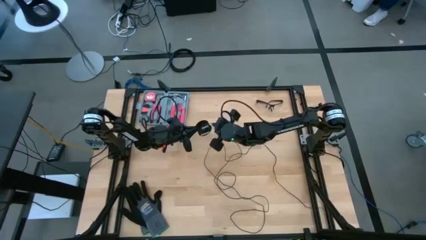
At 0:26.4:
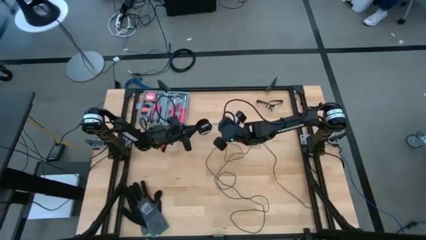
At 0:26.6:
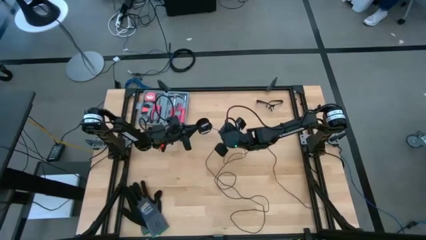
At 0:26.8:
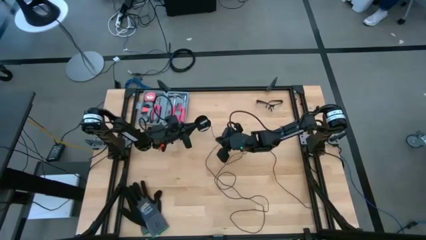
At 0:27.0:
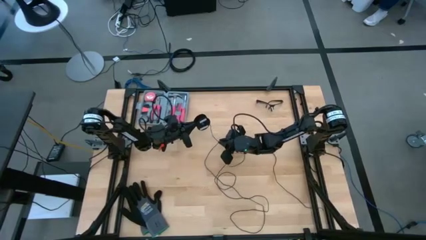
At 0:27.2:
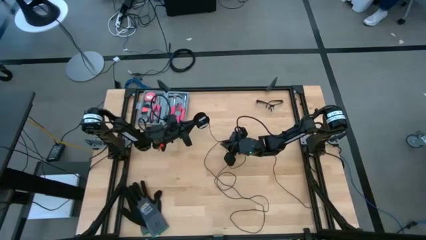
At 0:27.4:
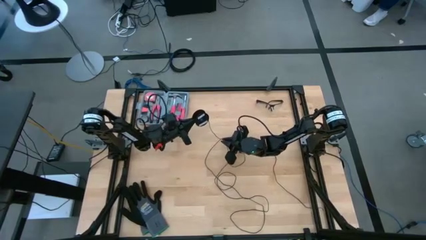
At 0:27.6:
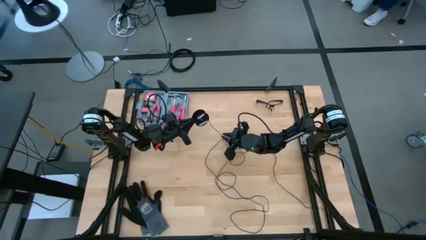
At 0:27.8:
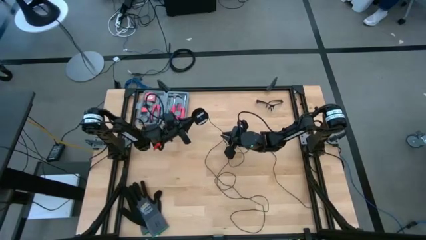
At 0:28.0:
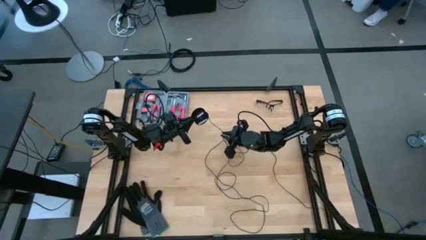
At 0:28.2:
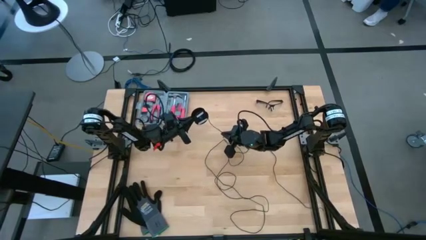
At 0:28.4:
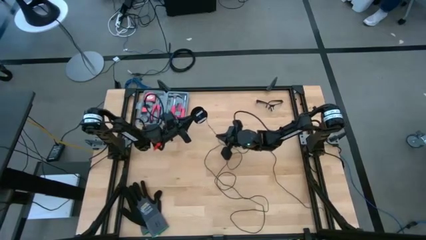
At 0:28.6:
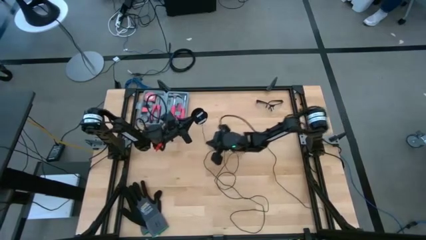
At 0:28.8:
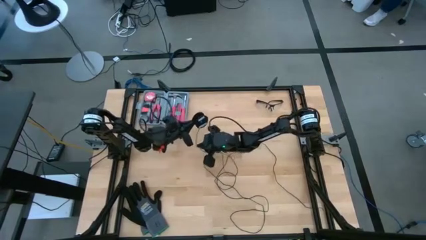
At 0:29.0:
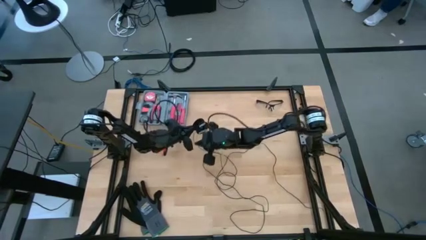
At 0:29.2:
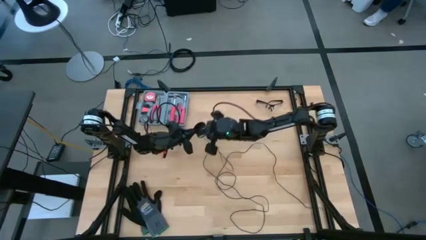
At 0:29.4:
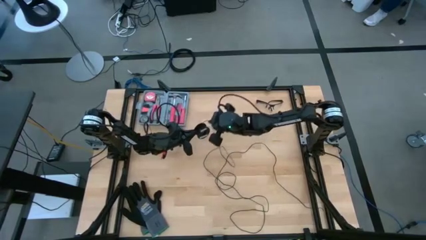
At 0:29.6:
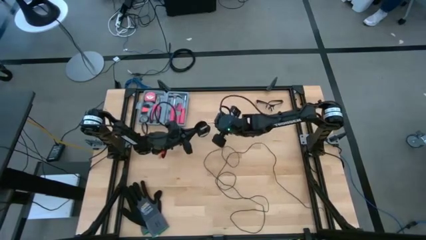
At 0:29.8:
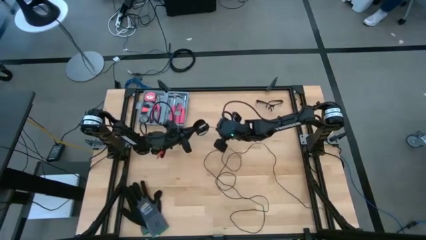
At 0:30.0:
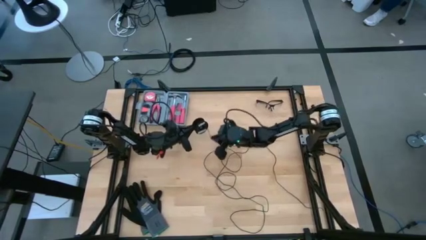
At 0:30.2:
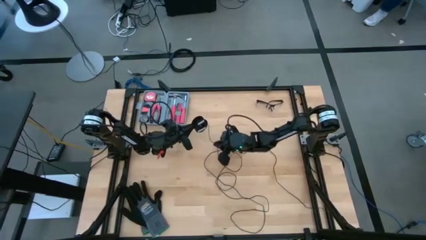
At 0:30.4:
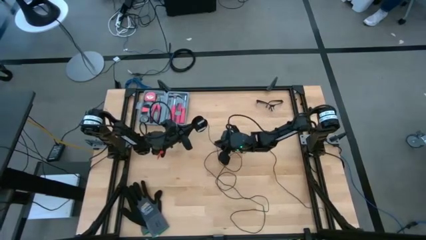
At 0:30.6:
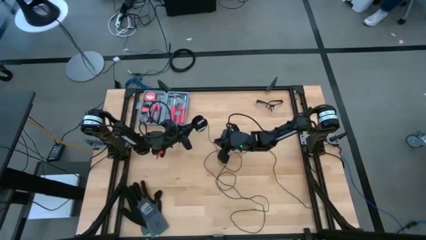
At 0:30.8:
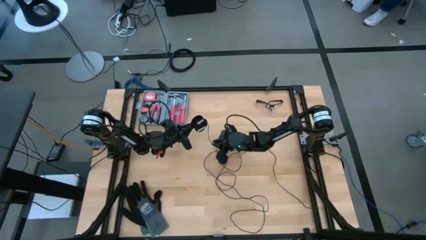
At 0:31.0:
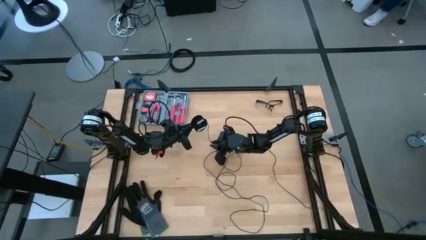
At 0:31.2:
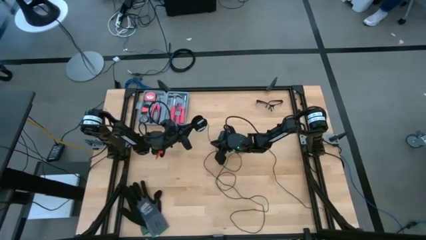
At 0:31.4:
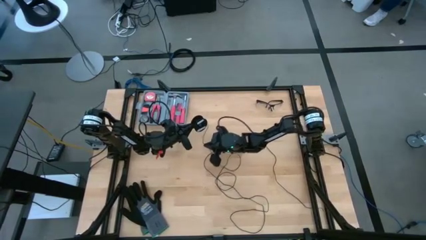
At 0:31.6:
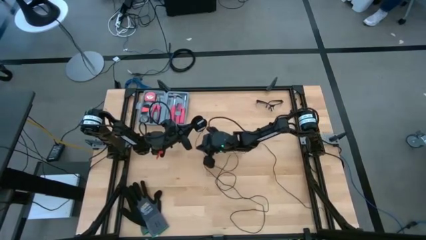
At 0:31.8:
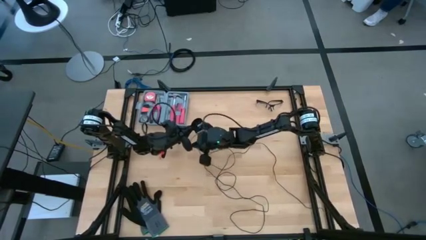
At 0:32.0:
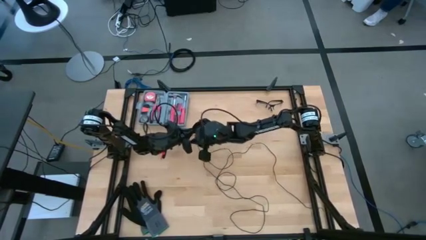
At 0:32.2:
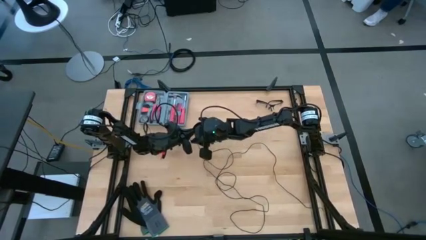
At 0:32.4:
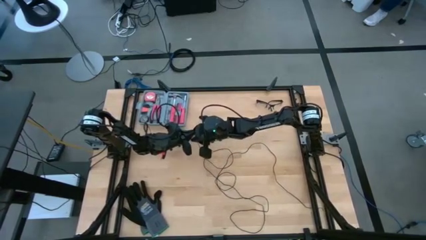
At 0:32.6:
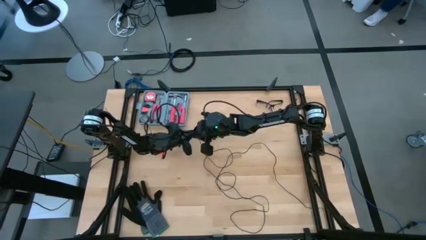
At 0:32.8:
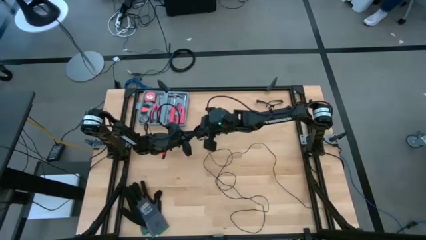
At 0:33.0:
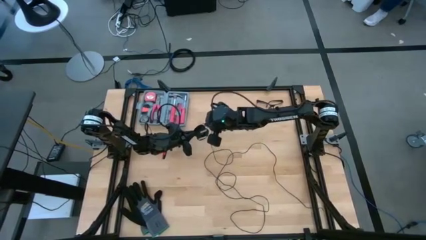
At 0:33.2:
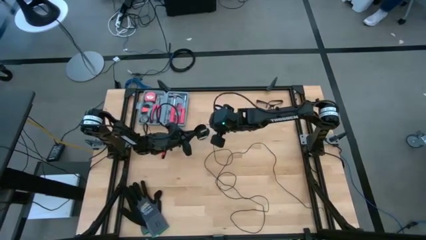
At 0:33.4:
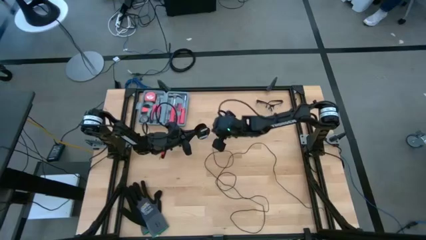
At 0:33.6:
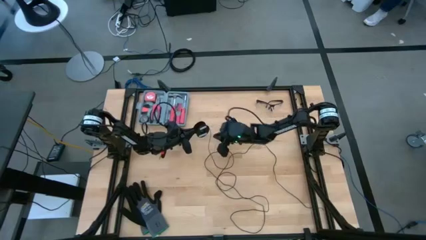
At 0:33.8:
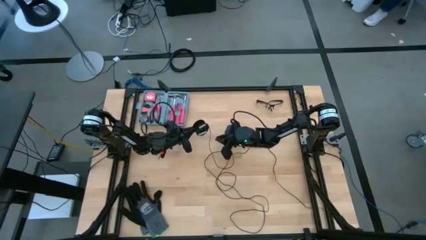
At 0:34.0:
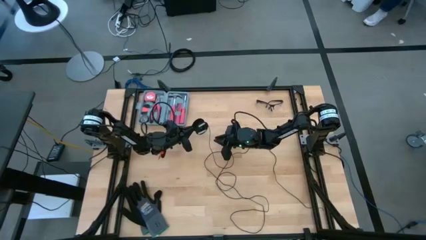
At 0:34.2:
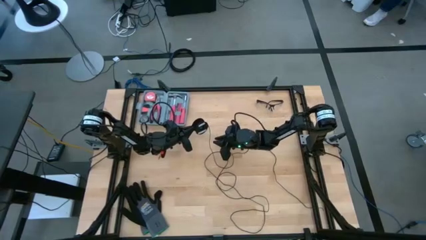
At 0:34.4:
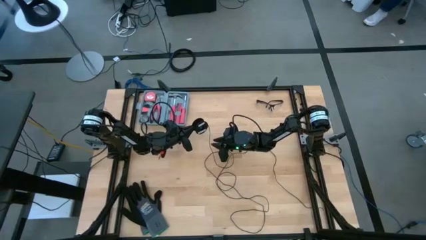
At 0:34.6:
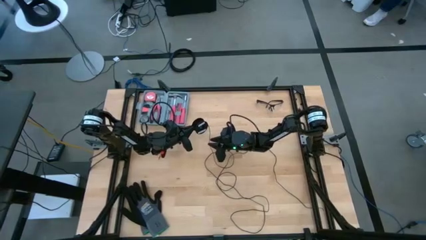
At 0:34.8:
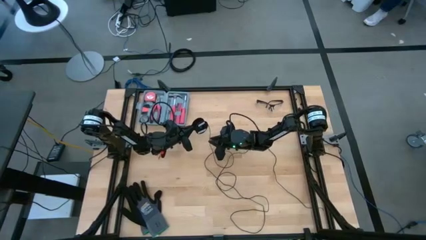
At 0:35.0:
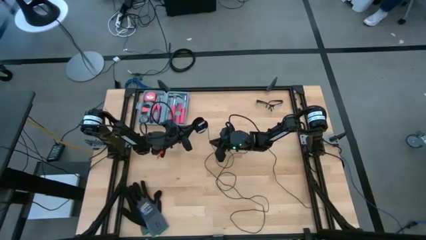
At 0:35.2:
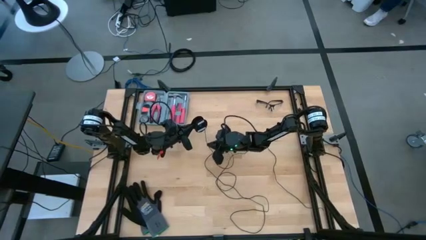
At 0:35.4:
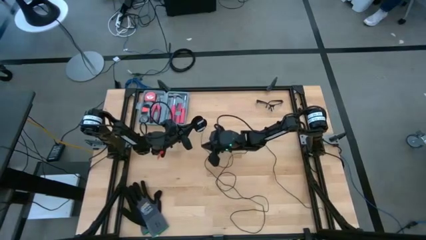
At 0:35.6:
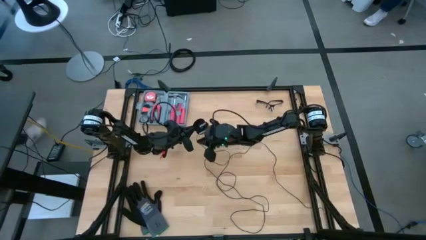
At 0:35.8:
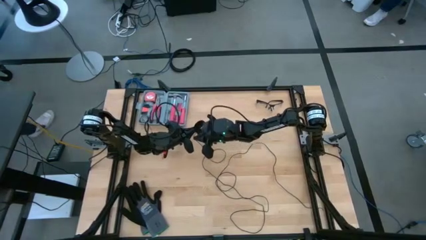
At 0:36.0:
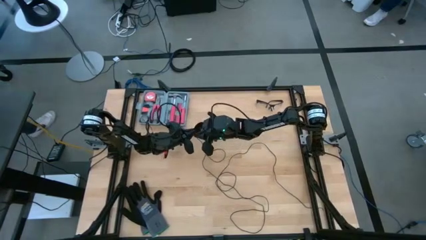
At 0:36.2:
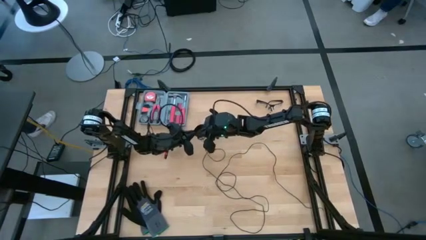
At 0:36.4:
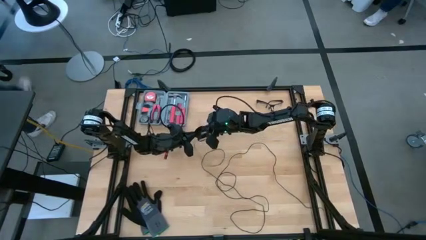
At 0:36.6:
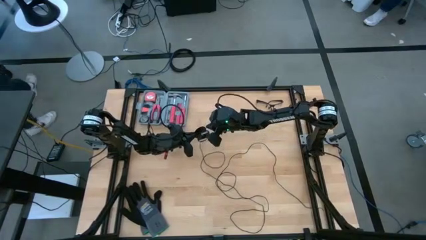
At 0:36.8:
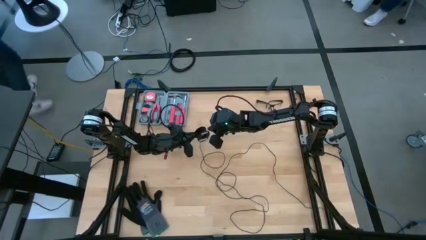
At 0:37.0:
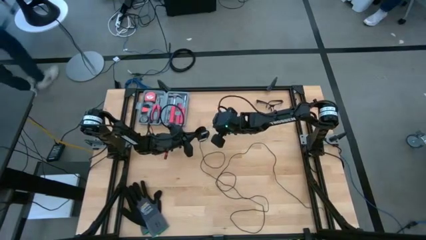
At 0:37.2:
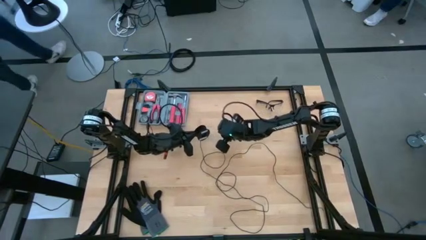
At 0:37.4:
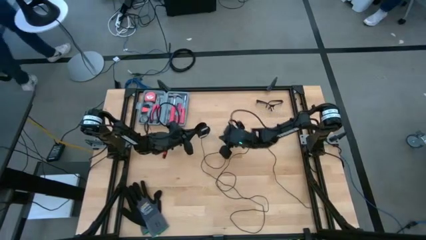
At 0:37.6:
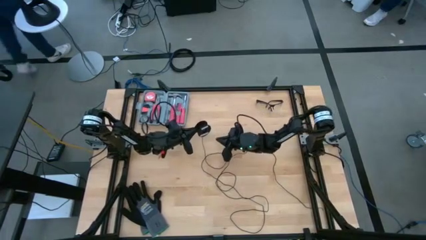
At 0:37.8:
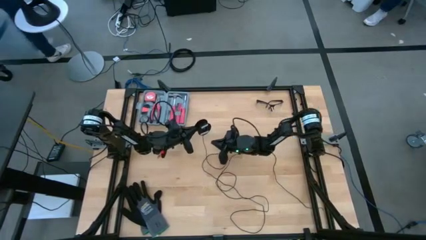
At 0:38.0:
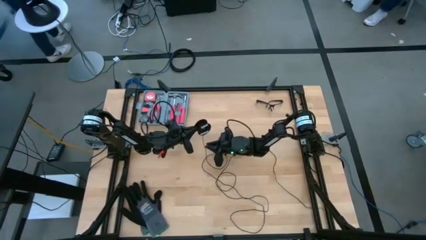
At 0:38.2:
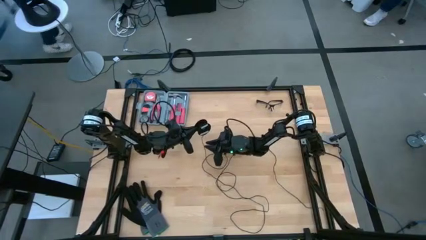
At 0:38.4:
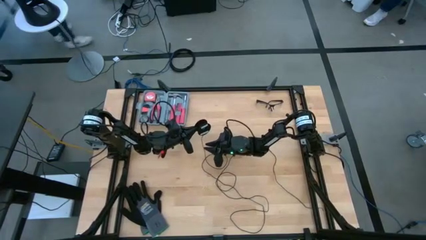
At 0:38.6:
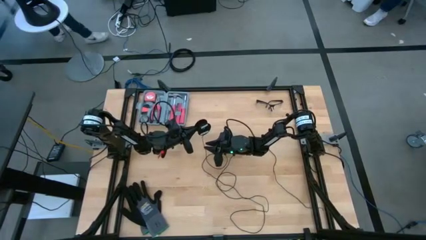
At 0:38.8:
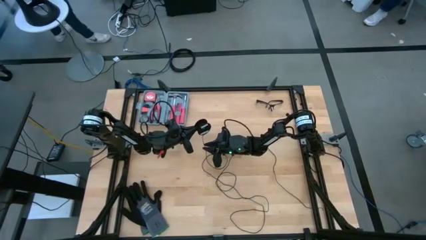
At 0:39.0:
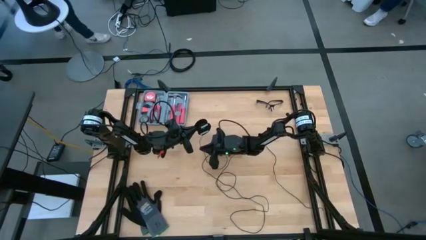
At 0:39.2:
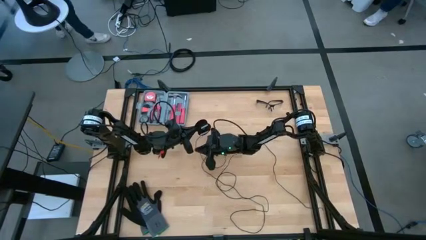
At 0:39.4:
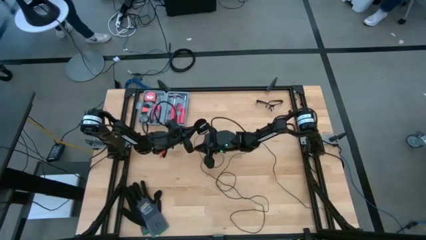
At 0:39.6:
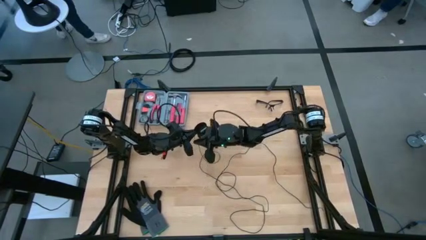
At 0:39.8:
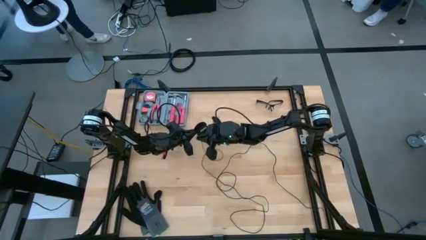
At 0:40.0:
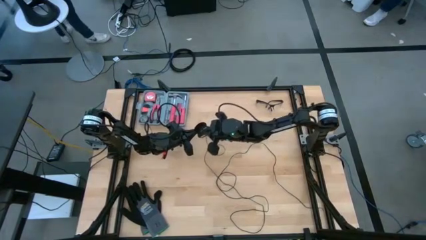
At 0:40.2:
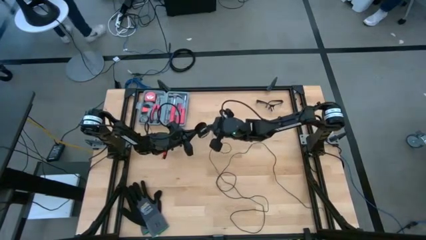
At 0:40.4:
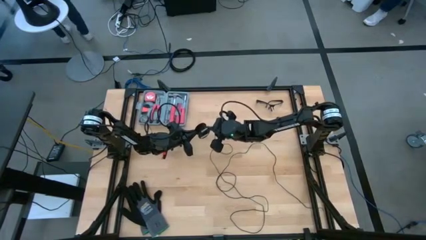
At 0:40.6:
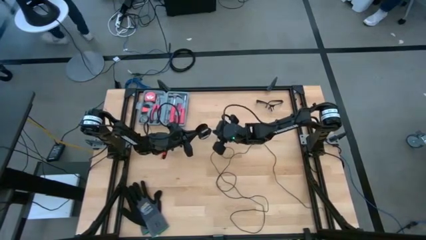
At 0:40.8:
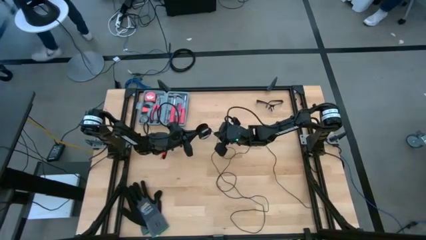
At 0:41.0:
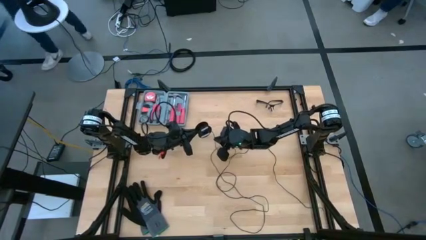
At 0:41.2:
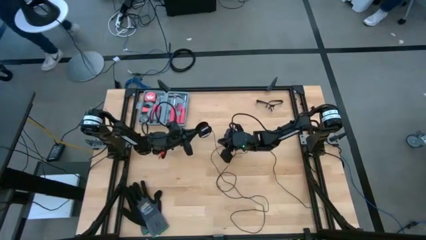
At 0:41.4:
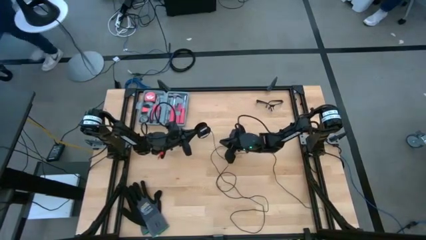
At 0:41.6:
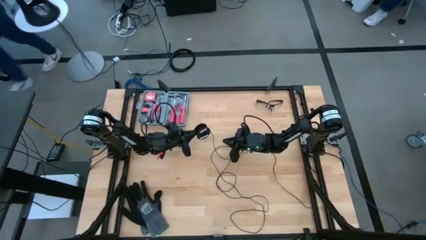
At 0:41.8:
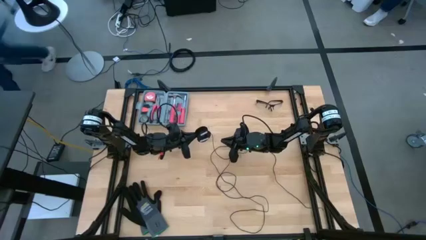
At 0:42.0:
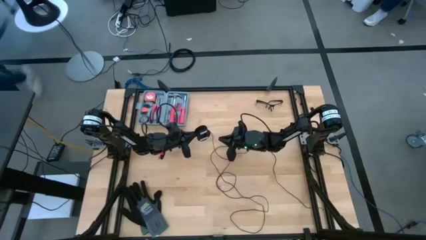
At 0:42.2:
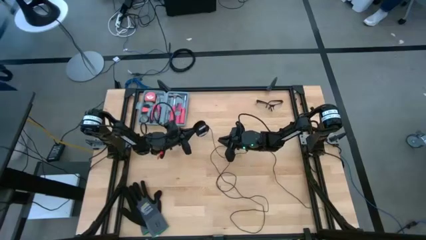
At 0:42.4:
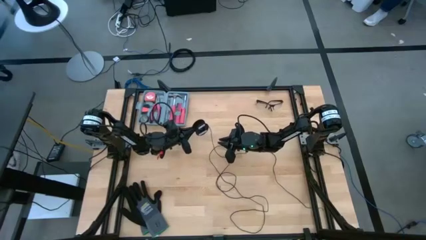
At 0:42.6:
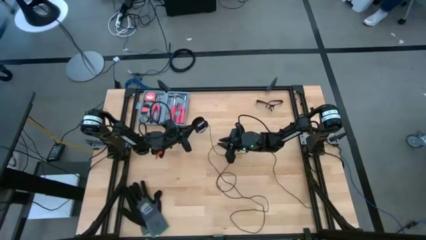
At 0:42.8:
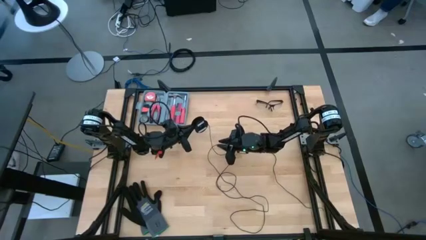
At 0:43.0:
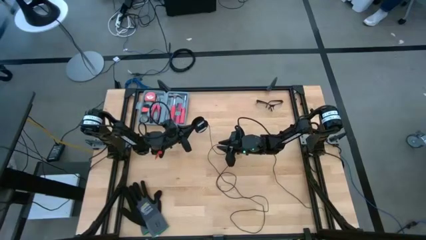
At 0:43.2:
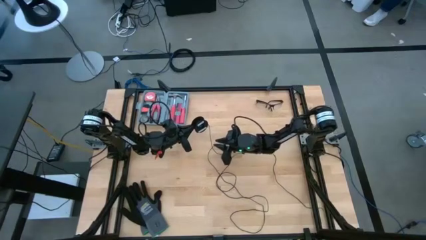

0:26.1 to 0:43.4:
Task: Coil cords
Coil the black wire on the black spool
